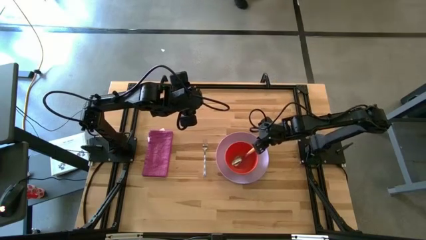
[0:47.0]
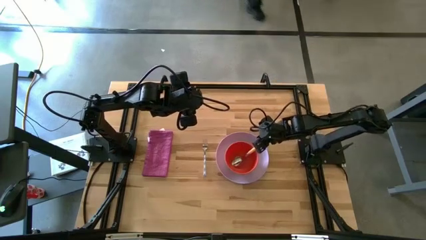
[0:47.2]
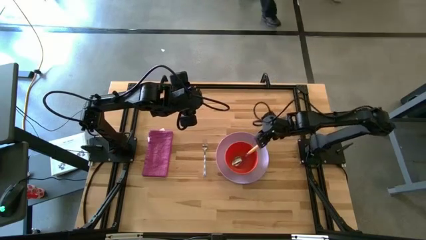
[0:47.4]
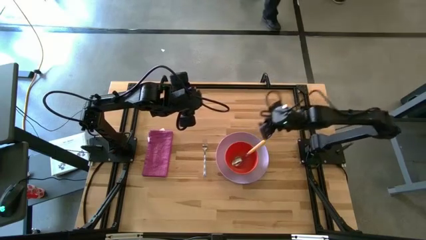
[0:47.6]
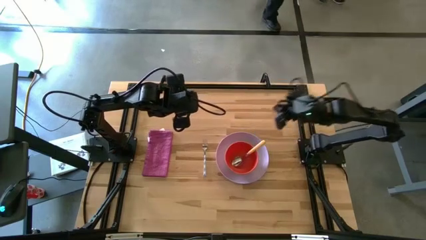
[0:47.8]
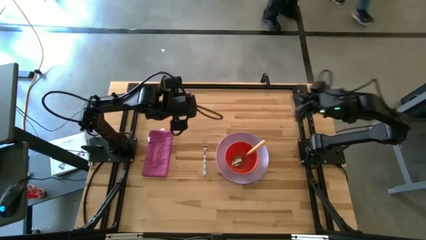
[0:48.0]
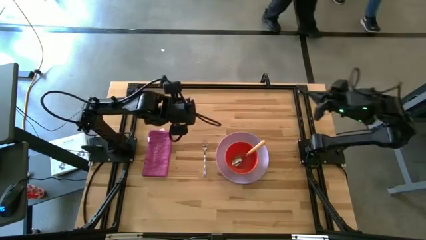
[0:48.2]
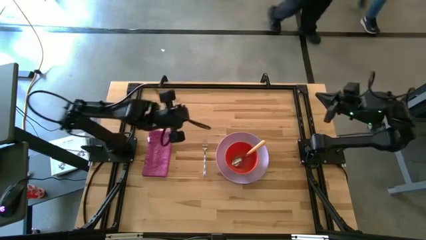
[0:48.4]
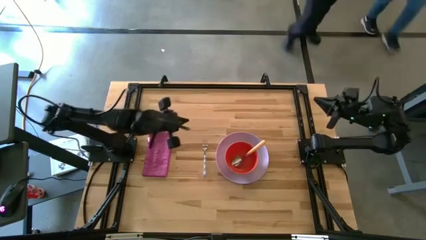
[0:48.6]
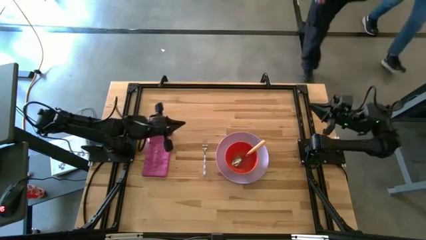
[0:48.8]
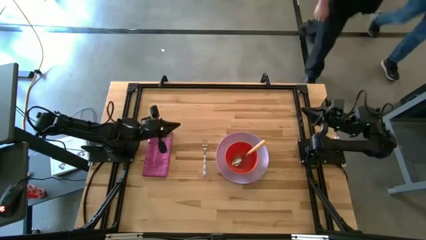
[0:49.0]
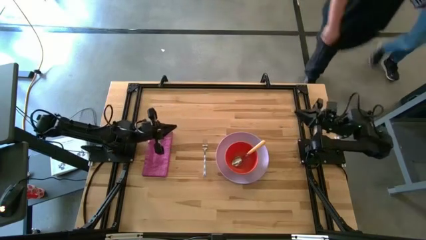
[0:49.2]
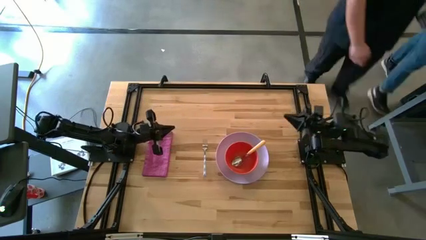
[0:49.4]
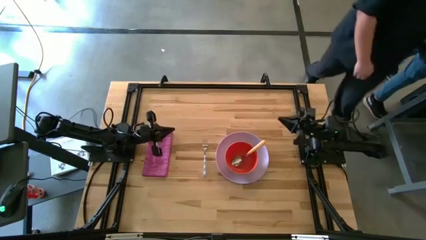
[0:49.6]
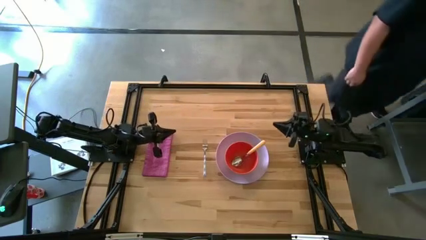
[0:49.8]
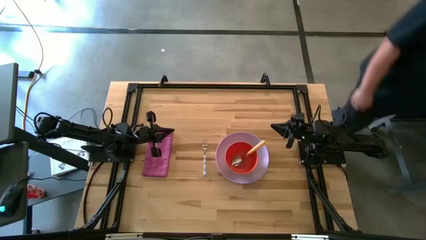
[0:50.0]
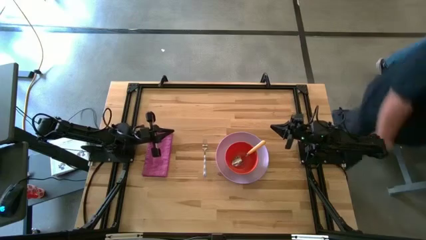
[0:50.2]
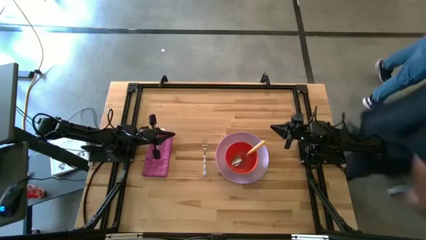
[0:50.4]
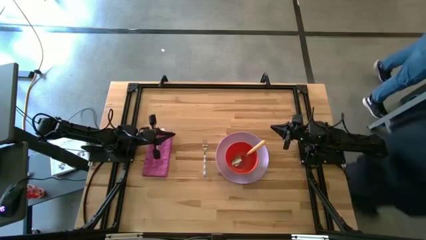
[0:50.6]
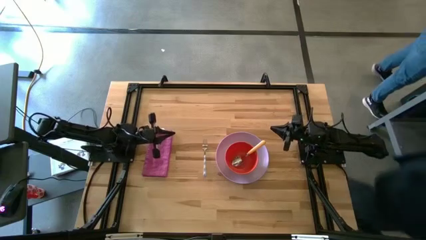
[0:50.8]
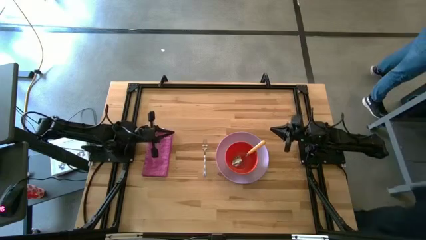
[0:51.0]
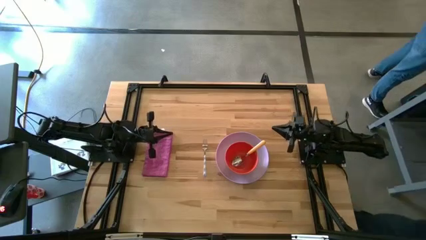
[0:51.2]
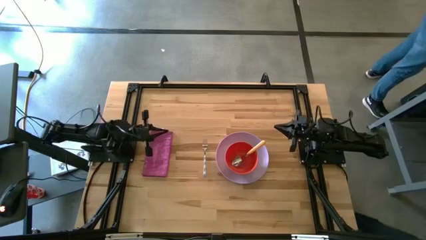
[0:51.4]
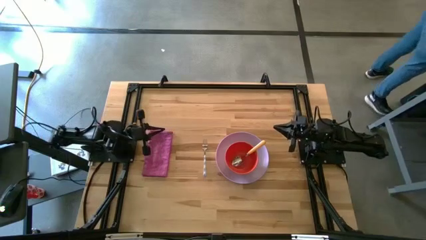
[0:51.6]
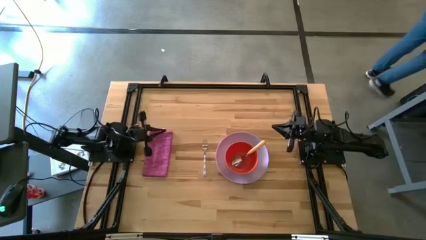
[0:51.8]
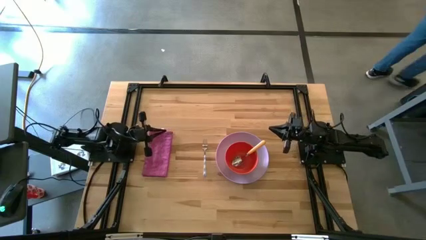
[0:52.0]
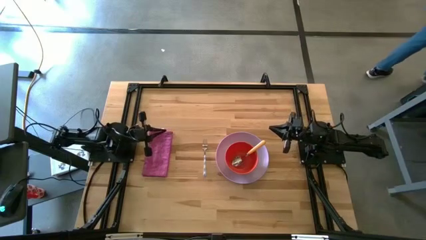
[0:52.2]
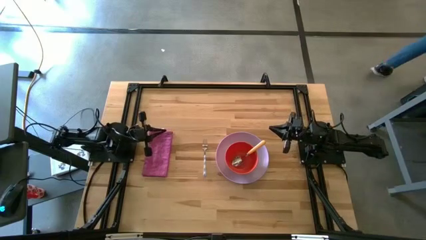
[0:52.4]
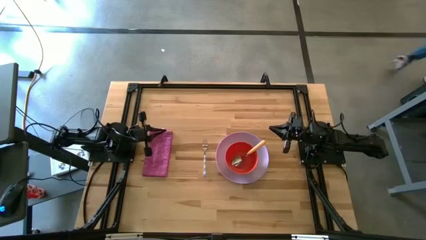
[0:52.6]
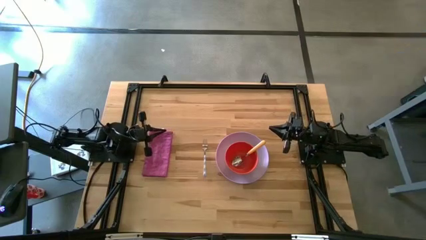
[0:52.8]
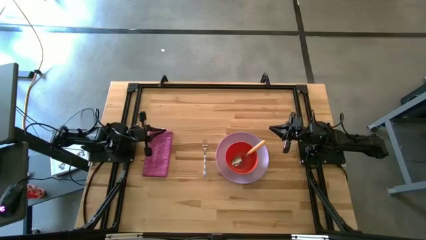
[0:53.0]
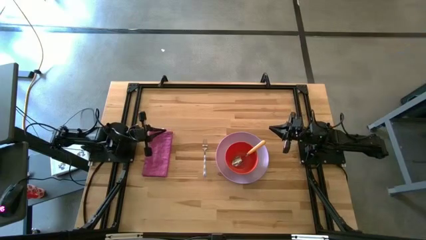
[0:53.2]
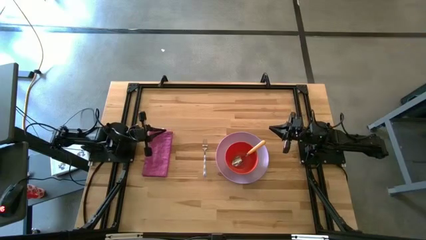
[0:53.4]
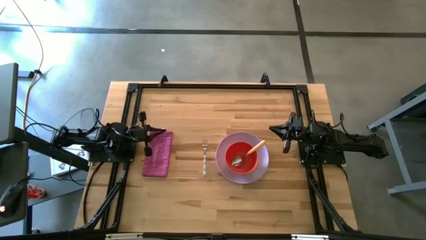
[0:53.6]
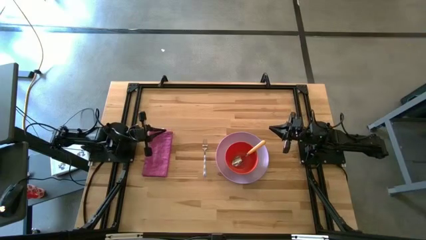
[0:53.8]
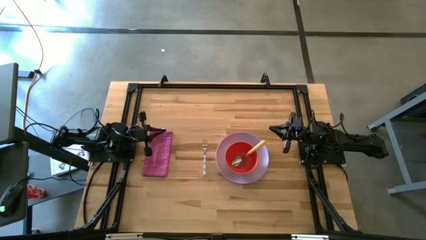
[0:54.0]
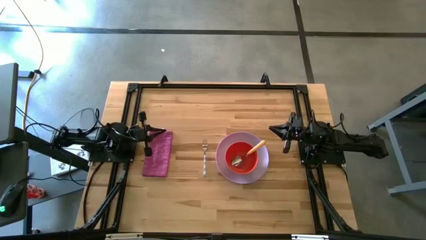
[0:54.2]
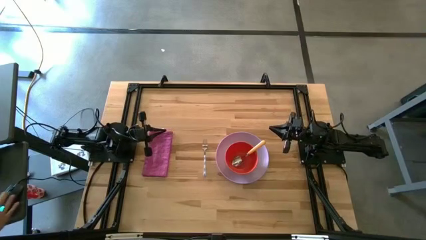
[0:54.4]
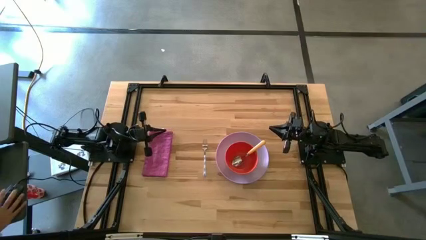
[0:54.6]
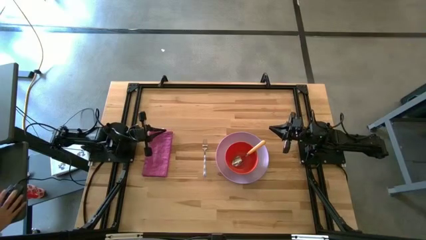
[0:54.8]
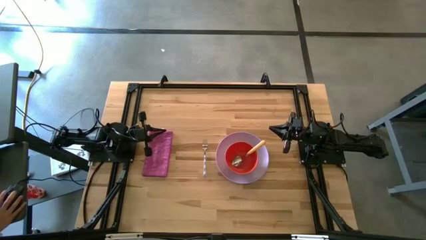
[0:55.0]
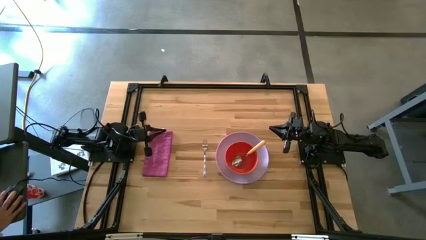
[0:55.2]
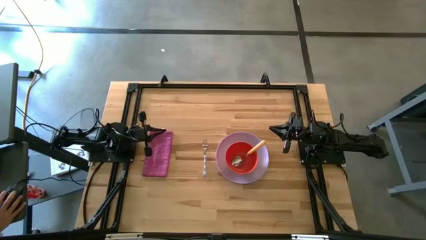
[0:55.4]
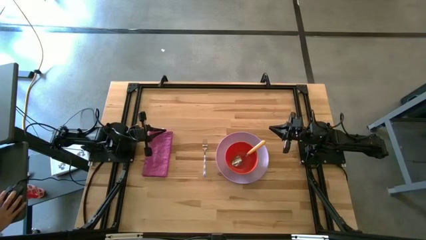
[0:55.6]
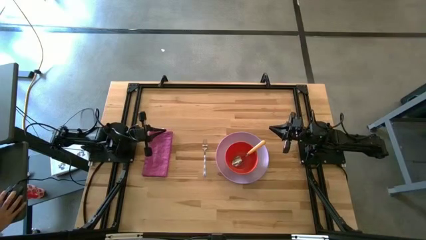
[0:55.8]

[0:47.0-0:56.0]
Task: Set table place
Return to Home Position
